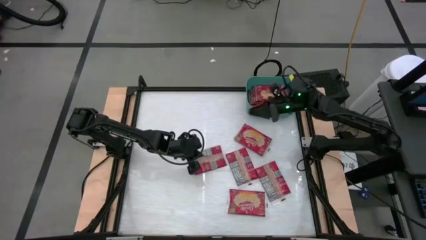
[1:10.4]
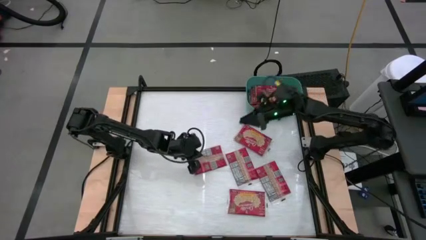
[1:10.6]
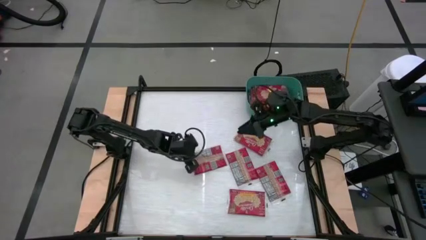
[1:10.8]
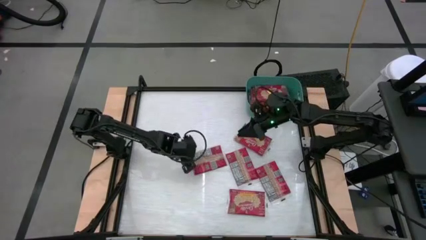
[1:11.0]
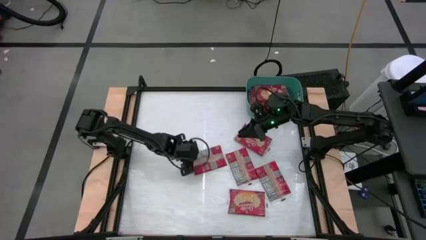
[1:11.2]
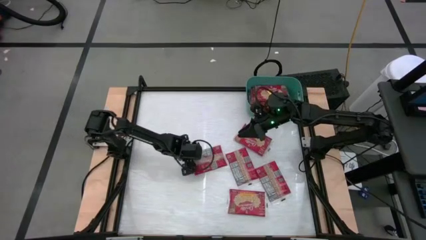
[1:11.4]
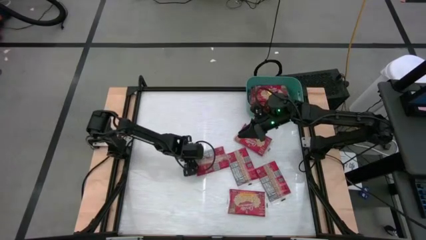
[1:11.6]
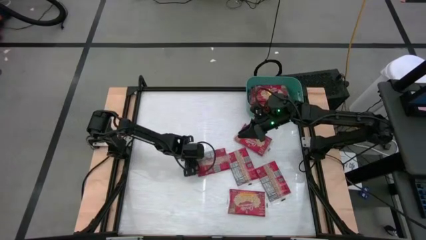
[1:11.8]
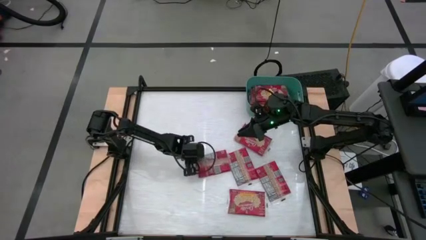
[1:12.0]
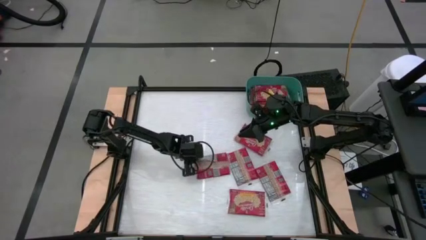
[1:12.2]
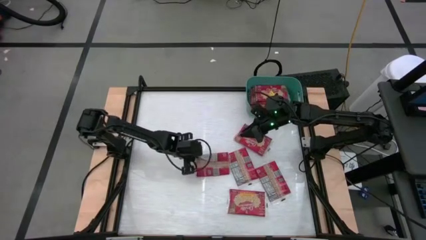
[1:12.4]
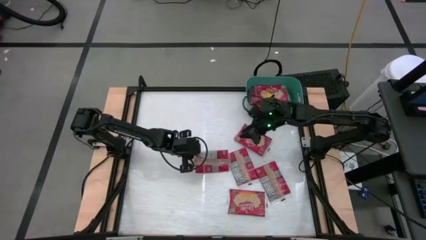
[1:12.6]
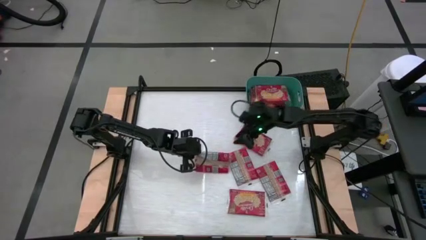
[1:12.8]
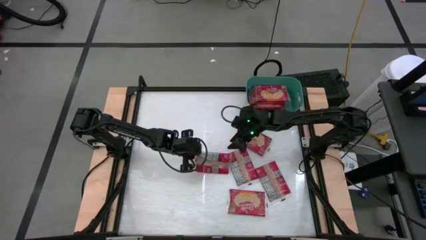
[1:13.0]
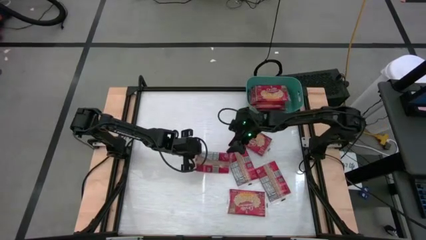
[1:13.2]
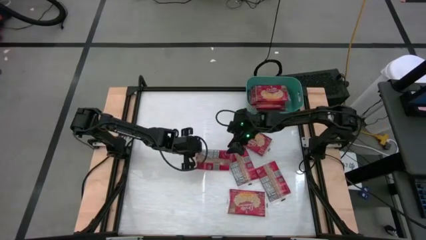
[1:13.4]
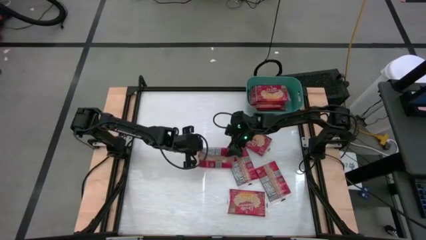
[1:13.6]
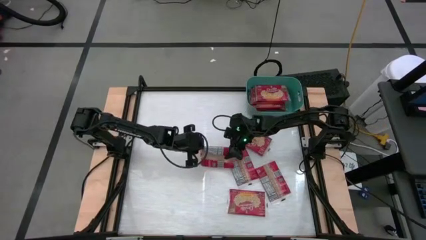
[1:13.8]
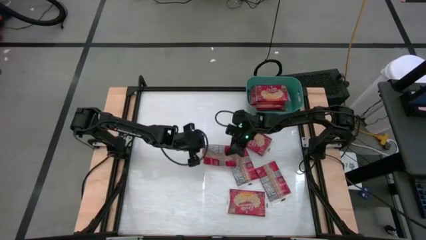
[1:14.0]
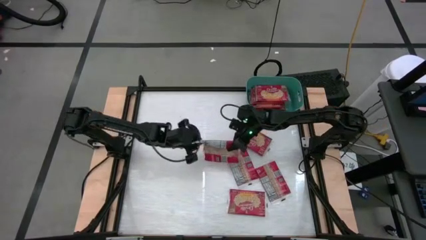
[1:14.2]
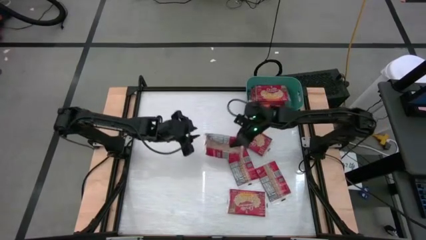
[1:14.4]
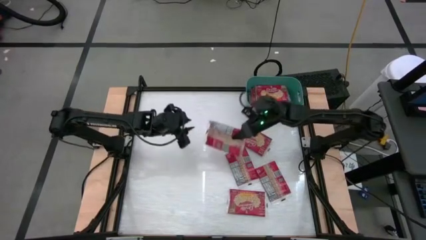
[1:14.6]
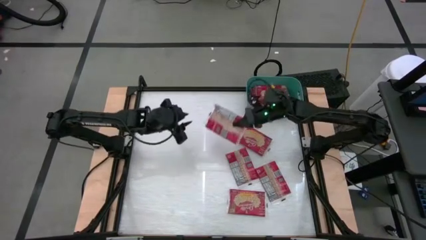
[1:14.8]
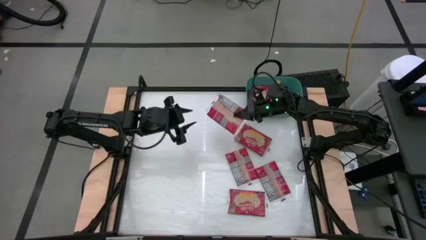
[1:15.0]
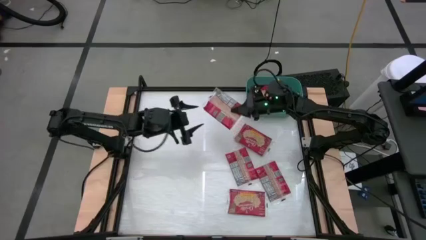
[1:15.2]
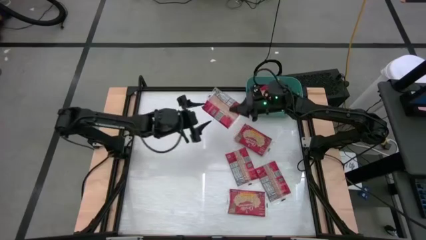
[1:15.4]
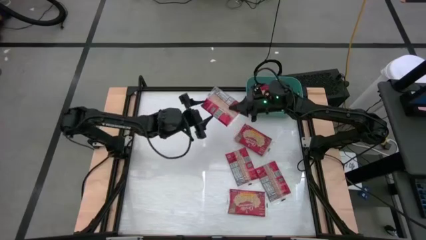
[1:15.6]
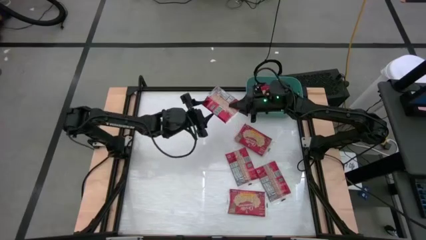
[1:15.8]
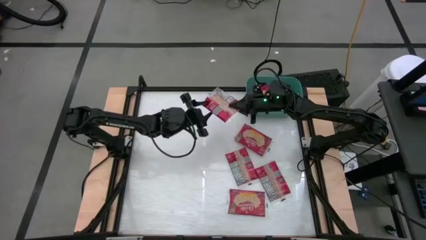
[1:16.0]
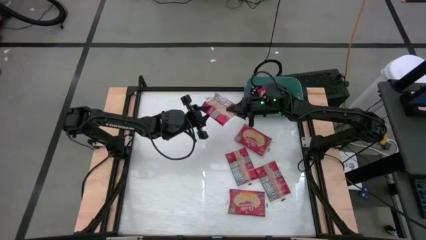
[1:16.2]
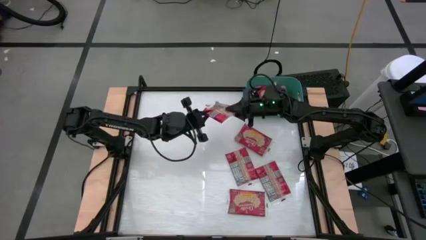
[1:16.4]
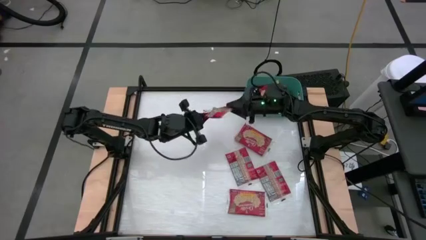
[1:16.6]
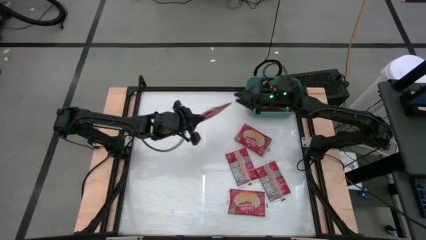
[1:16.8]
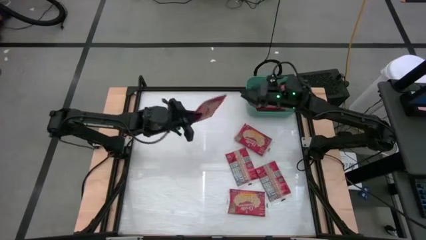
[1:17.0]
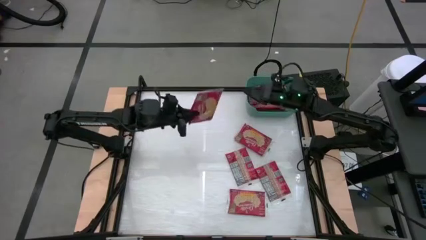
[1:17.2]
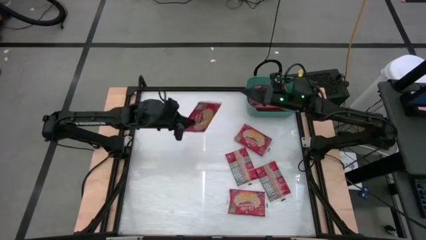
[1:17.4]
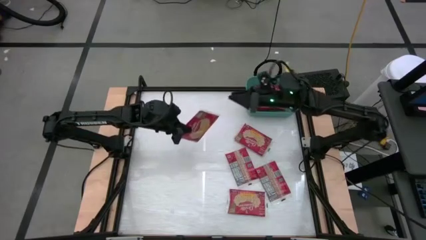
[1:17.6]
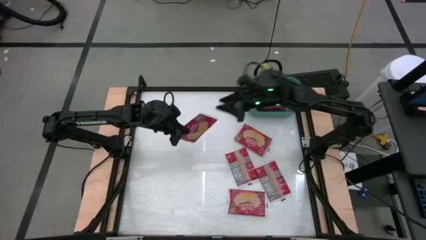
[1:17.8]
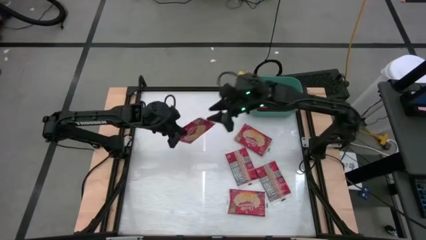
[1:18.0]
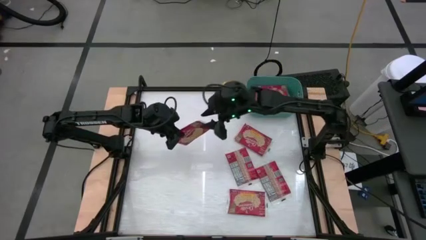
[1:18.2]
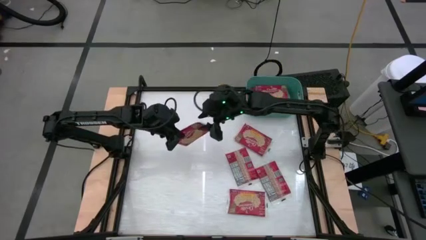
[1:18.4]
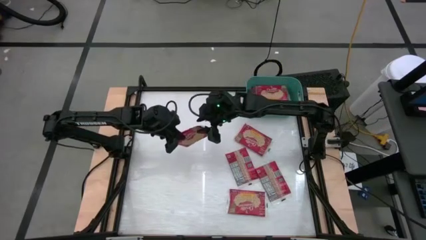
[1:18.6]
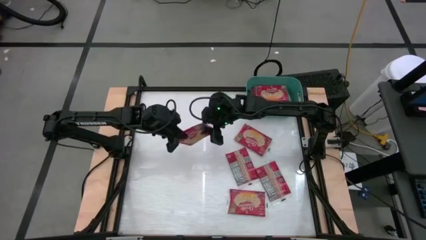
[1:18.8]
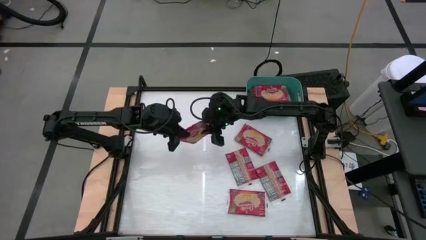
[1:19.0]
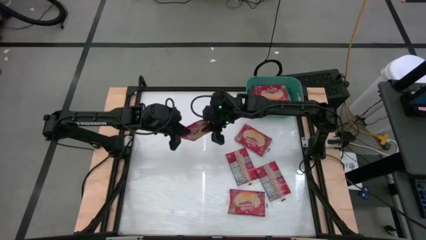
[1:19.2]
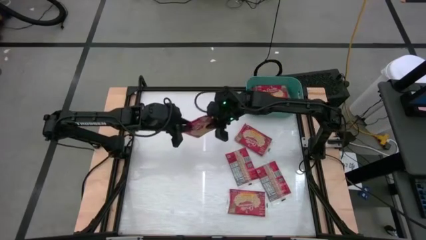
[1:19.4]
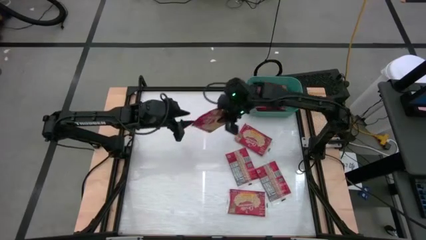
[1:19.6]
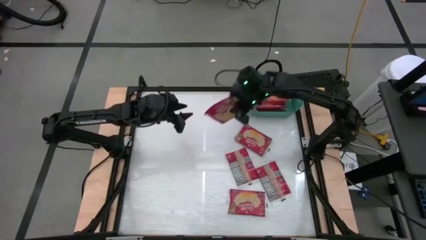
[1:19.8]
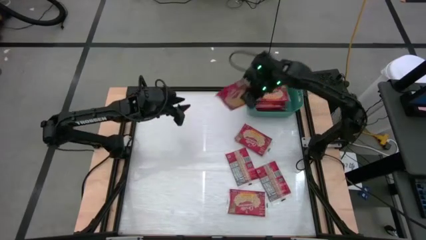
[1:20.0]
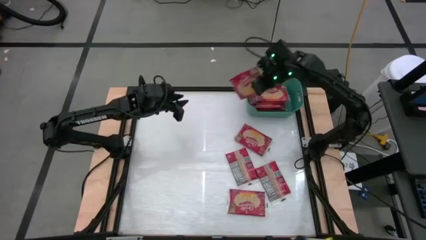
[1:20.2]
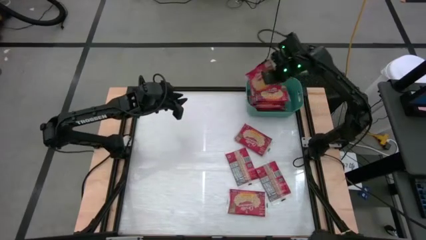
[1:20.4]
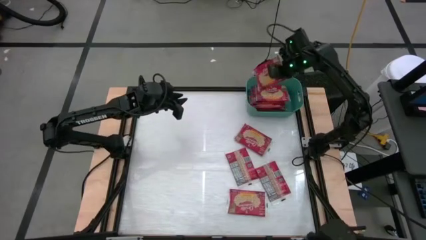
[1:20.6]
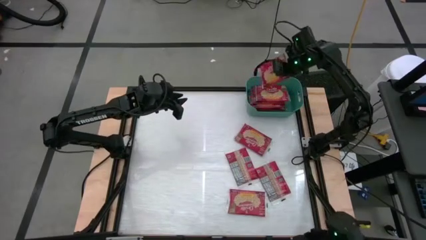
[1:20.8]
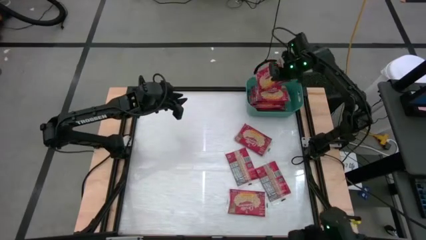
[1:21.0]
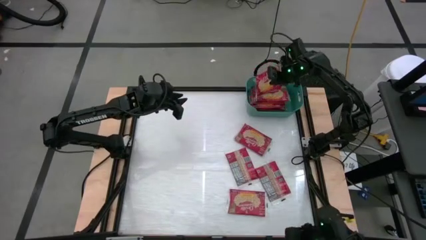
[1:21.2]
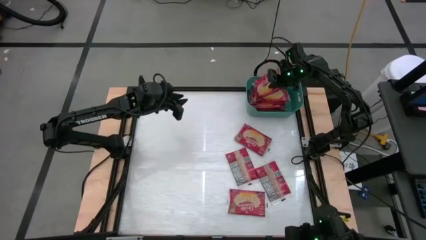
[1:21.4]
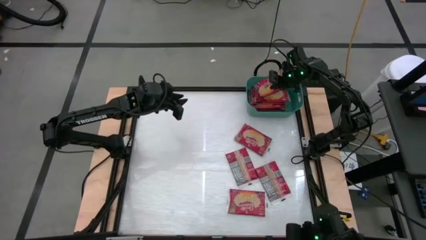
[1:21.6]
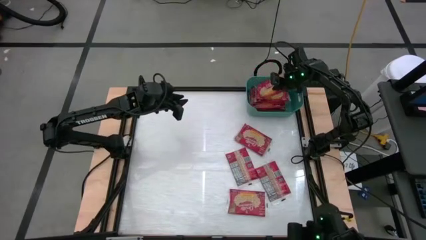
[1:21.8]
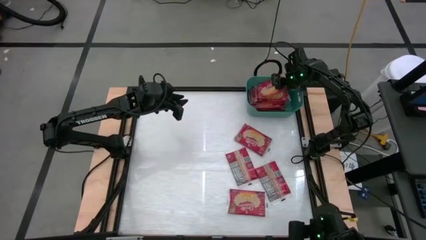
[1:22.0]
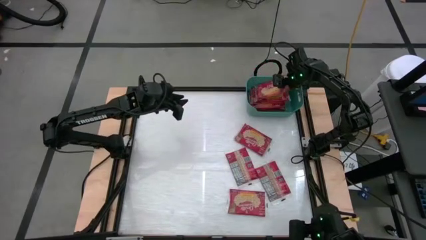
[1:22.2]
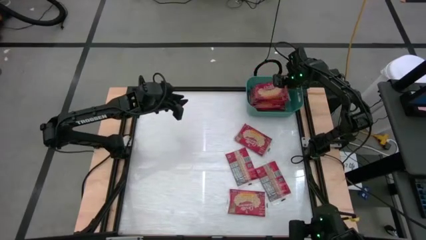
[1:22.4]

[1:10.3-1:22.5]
Task: Sort popcorn bags into baskets
Put the red popcorn bag into the green bin

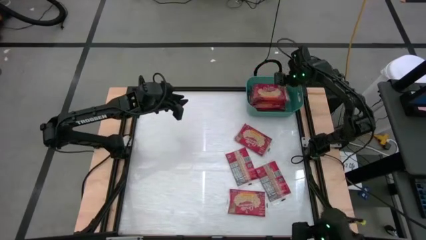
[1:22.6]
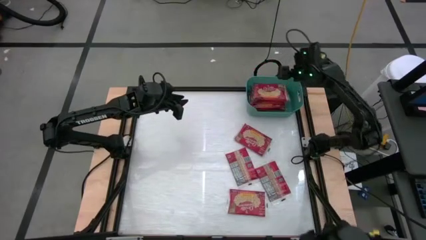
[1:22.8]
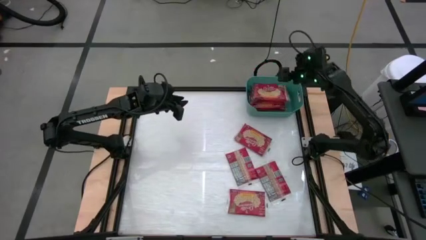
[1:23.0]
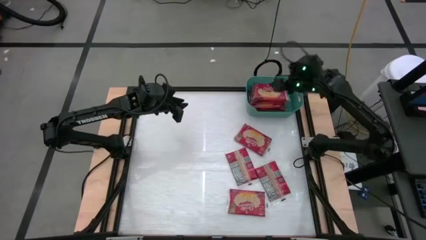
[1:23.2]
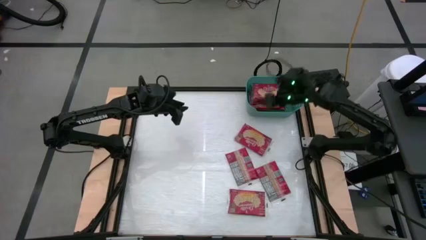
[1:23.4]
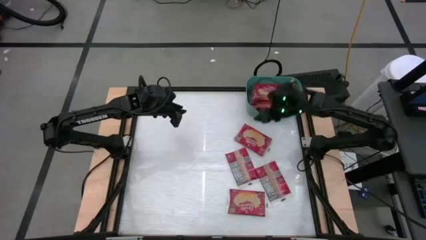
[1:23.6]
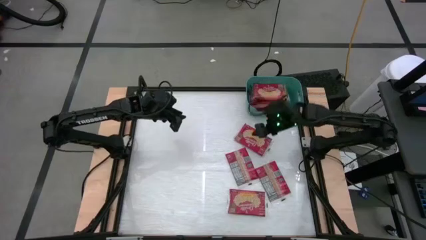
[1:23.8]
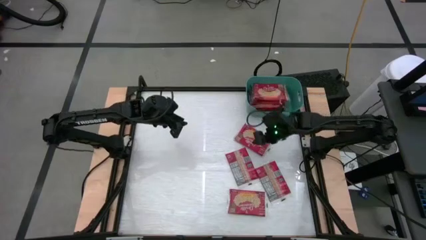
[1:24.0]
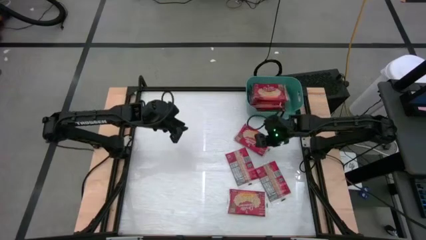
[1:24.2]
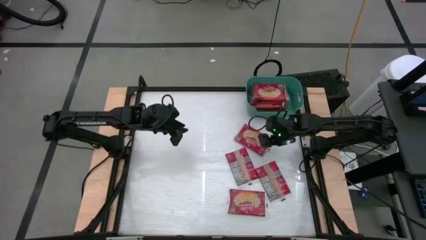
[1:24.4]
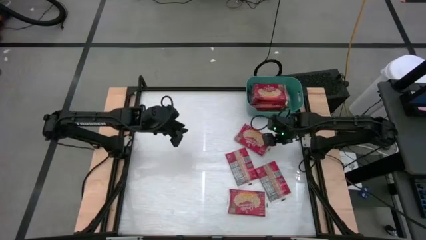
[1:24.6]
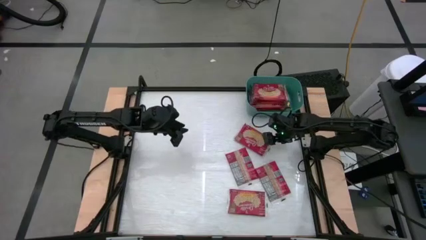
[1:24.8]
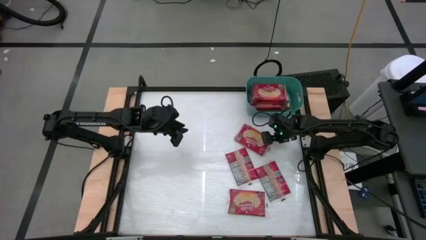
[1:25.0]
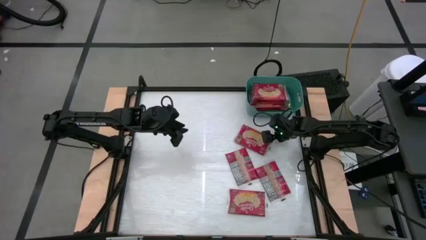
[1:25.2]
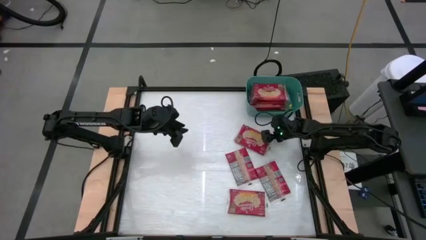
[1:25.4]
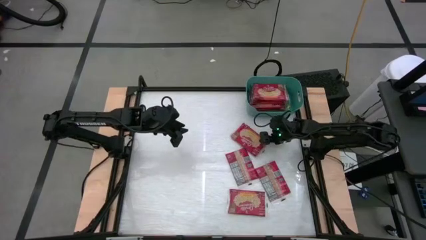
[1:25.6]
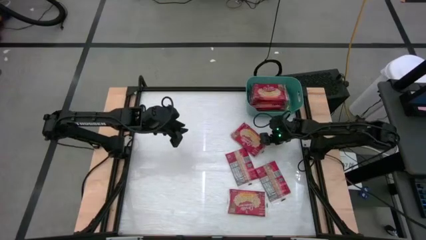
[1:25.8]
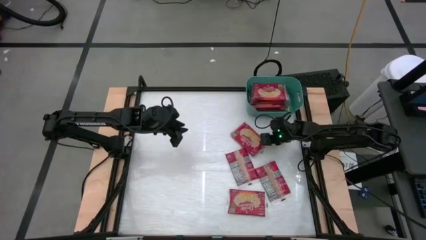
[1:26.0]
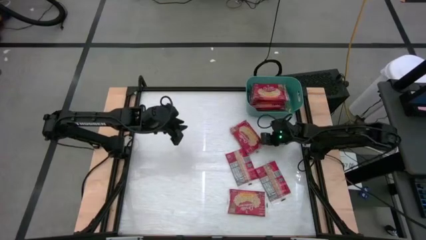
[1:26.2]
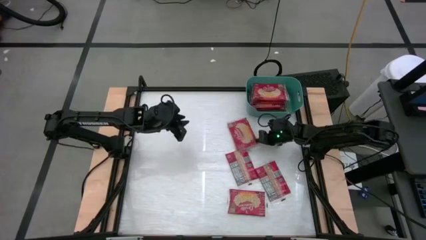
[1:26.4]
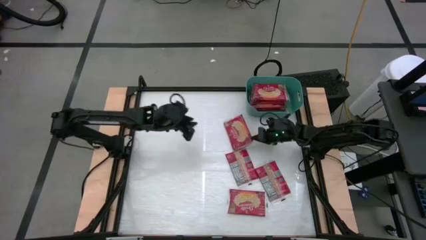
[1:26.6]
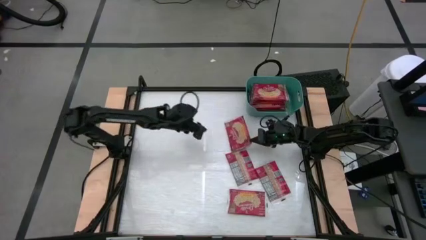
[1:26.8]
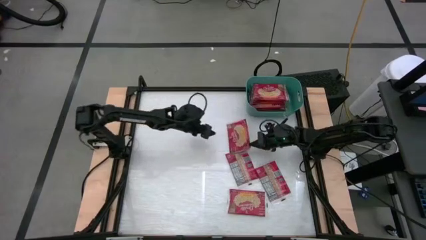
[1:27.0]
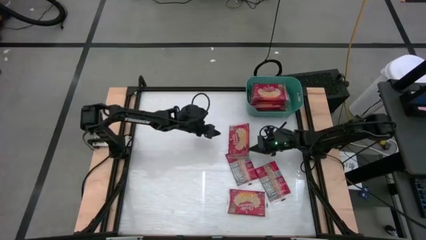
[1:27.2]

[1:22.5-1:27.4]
Put the red popcorn bag into the green bin
